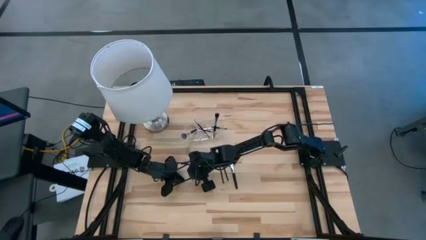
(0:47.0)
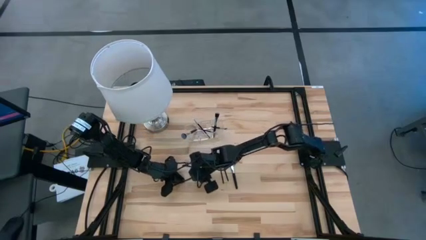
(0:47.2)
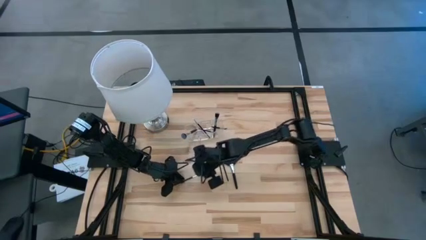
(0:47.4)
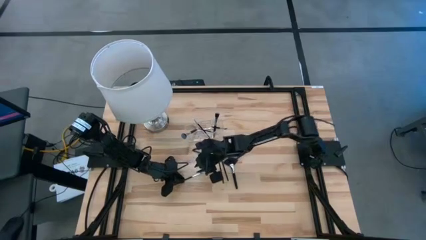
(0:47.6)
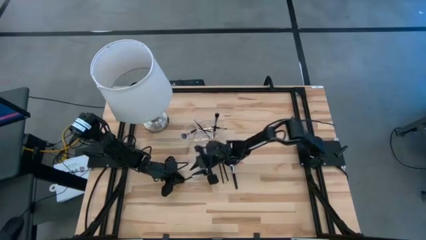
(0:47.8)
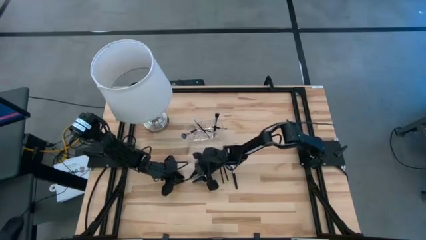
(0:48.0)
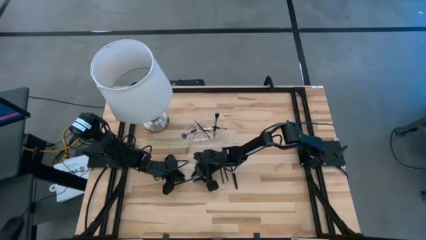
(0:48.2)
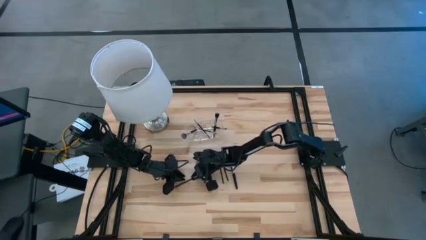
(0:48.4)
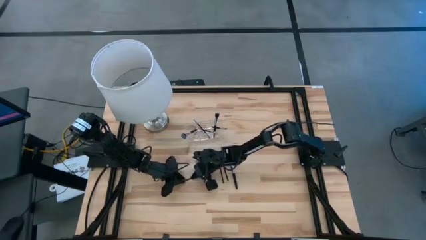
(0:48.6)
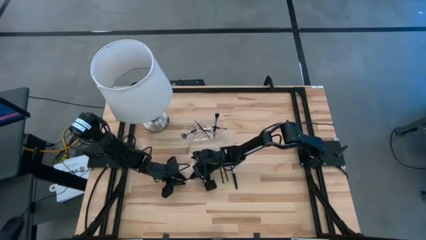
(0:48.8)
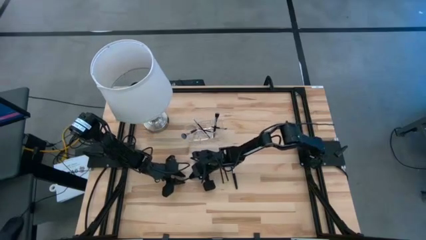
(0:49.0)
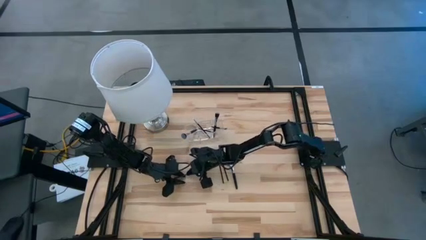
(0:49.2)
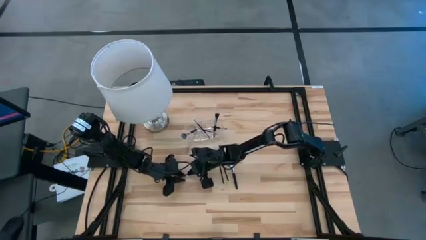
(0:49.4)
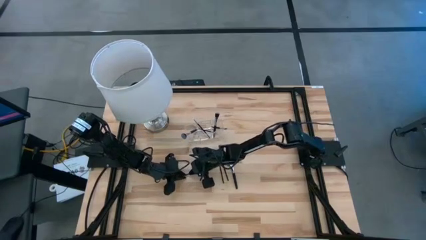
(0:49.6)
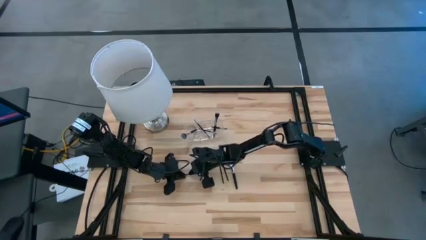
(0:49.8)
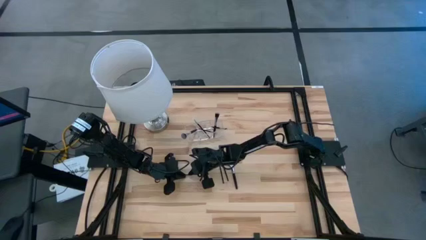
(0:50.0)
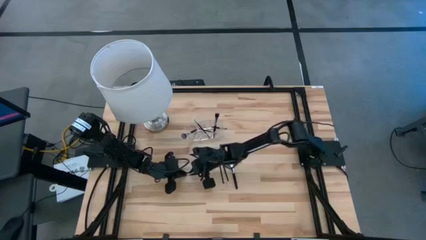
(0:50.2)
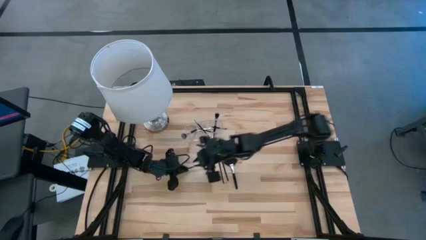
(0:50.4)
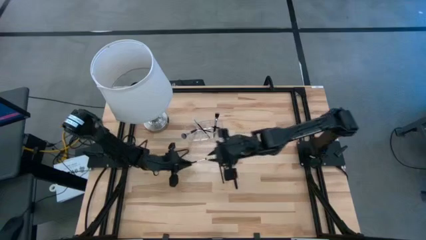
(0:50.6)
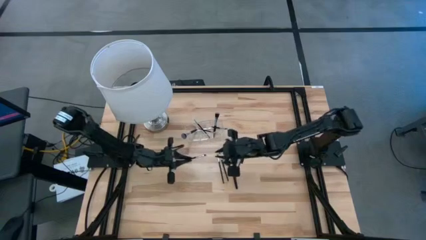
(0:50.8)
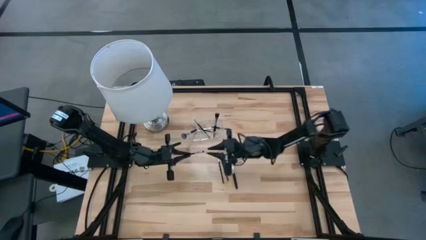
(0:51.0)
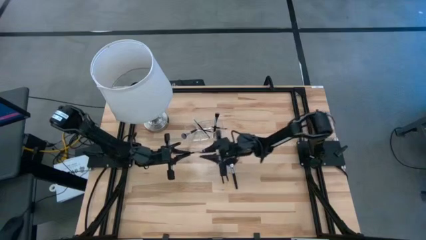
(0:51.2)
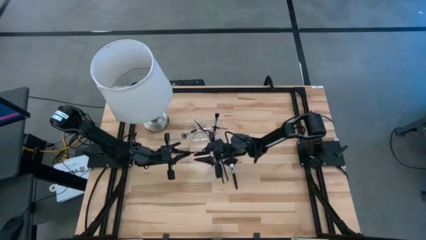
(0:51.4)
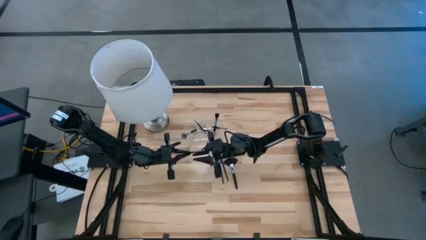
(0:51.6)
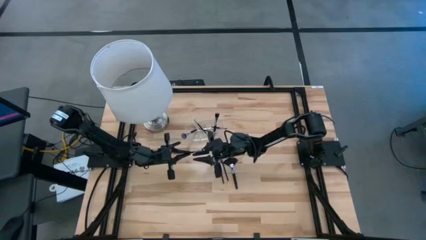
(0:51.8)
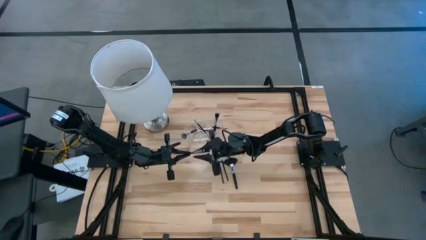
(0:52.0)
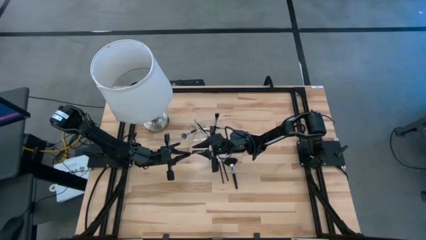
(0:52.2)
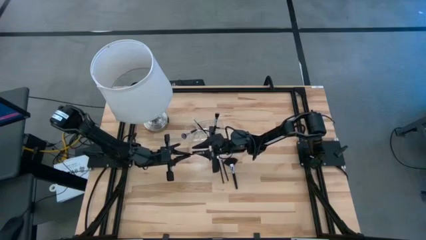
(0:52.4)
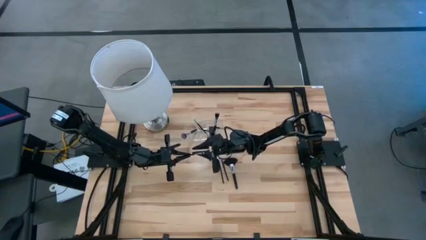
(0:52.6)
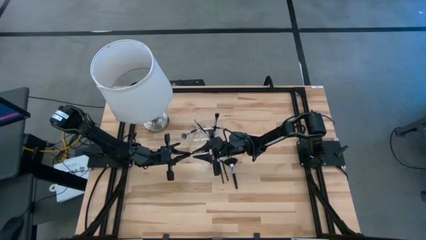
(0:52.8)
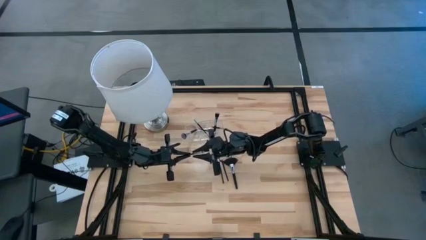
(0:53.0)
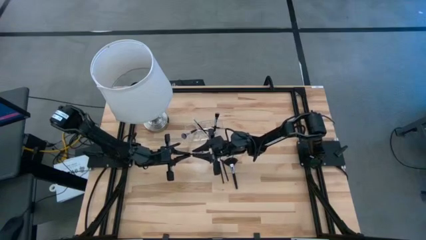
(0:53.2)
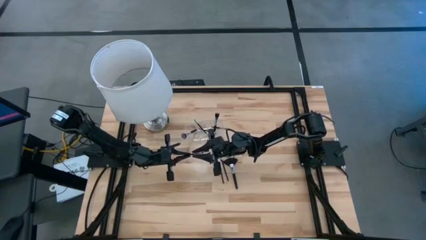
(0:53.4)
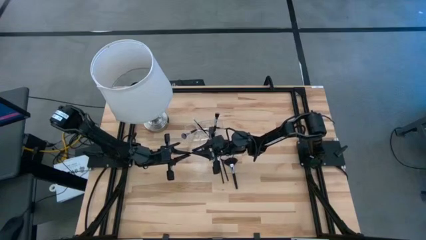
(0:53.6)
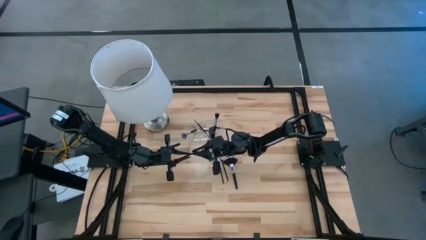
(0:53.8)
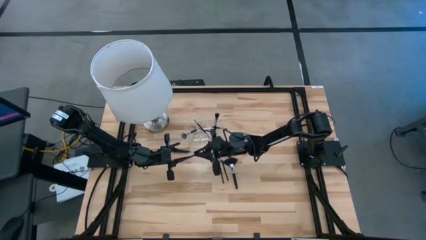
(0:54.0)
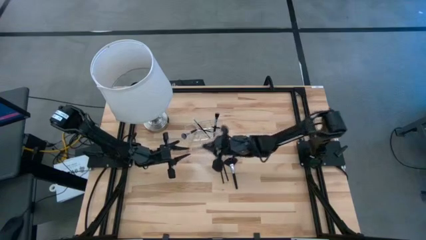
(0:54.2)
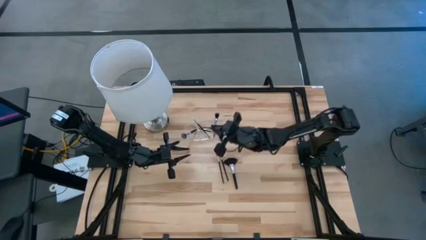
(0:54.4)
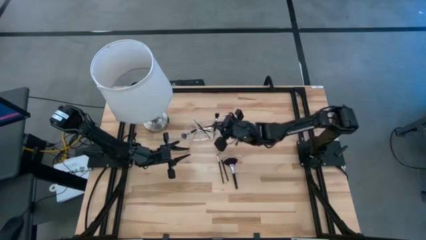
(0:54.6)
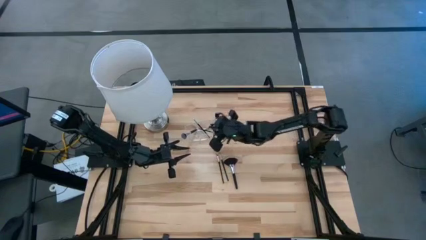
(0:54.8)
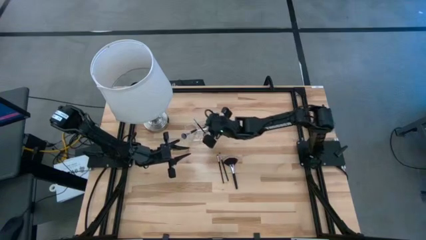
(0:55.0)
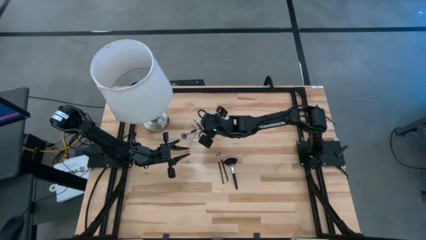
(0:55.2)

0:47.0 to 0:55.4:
Task: Put items in baskets/containers
Put the black foundation brush into the transparent organizer

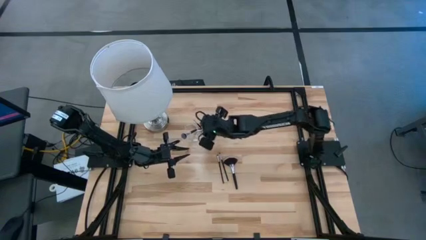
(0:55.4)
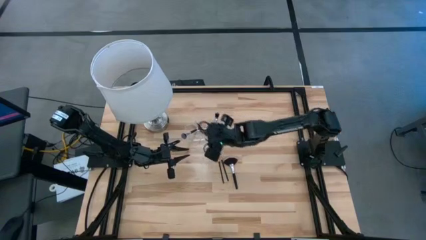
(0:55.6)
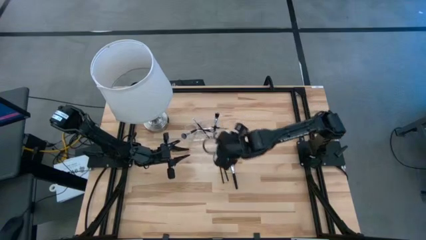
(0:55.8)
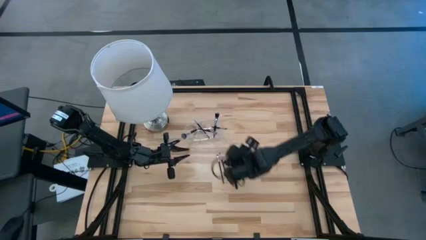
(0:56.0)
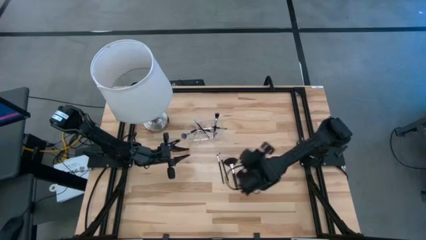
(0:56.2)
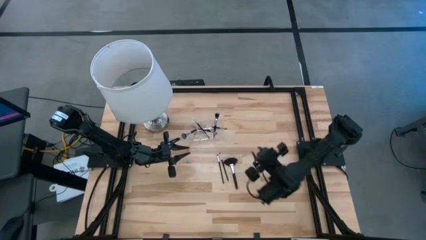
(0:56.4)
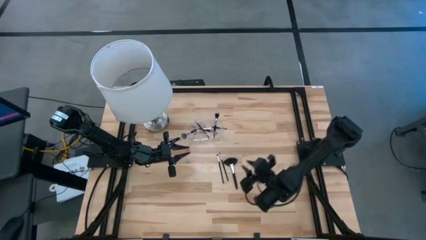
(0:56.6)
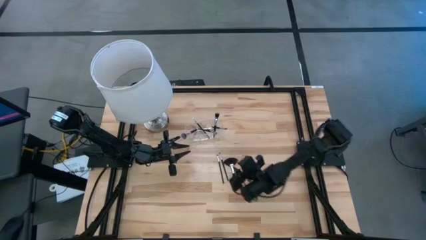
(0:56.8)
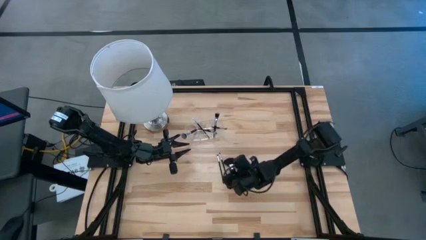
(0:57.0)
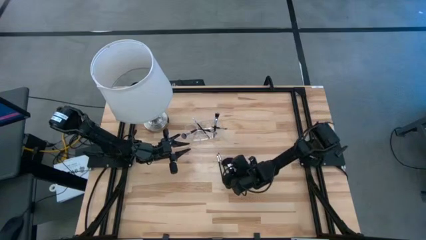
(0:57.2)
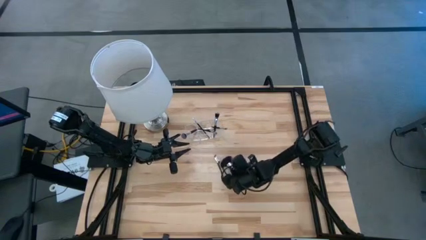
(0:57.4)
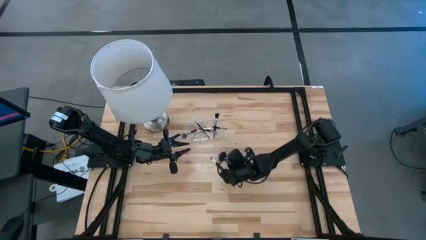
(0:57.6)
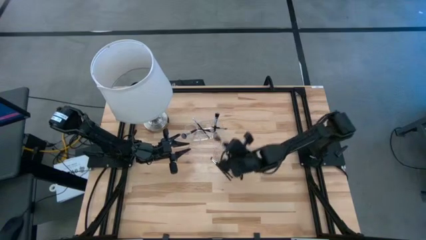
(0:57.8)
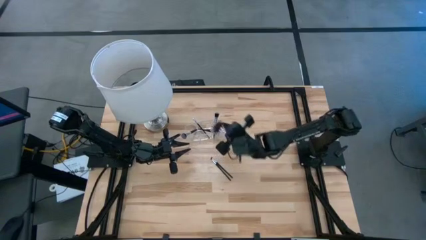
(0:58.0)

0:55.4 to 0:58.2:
Put the black highlighter brush into the transparent organizer

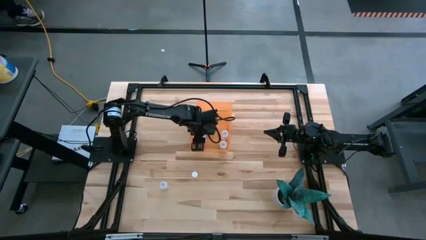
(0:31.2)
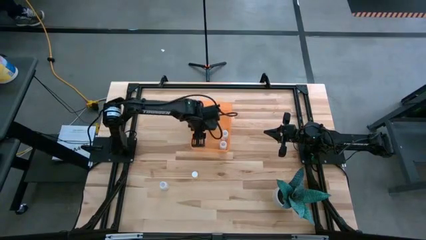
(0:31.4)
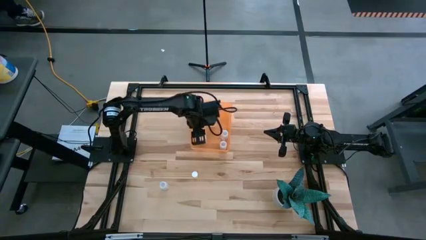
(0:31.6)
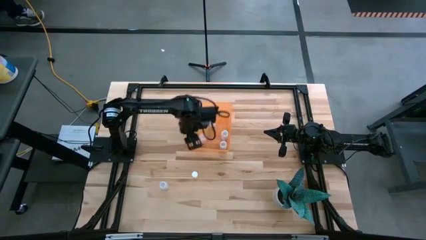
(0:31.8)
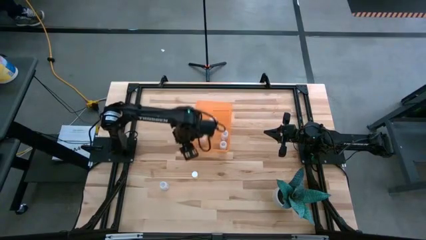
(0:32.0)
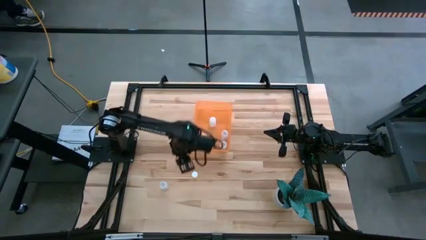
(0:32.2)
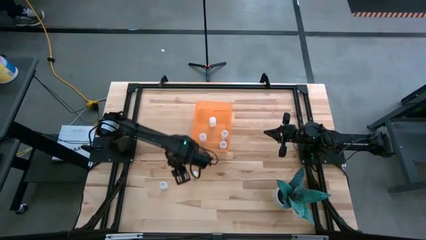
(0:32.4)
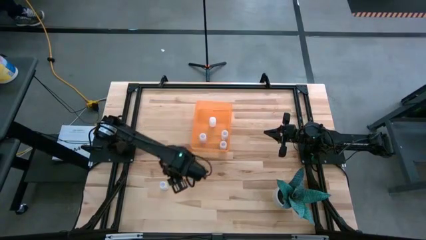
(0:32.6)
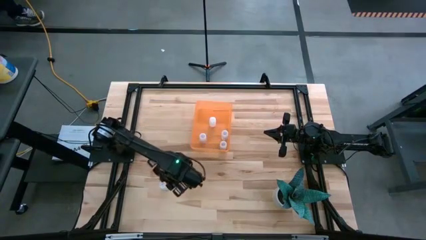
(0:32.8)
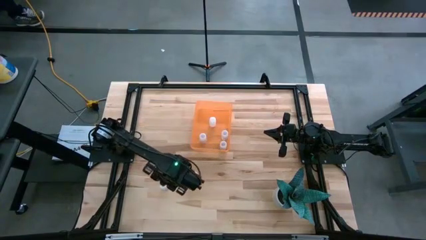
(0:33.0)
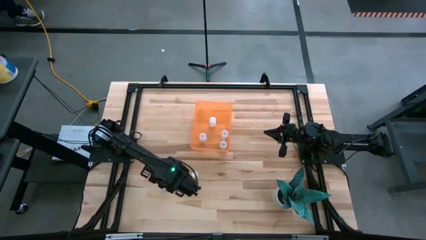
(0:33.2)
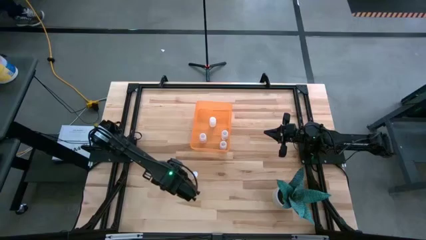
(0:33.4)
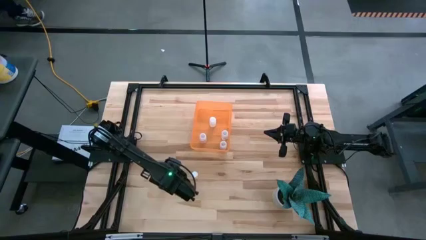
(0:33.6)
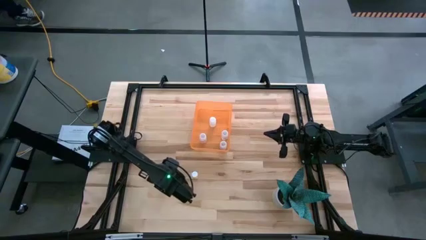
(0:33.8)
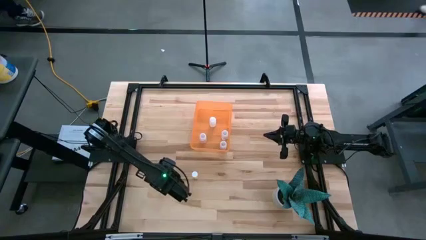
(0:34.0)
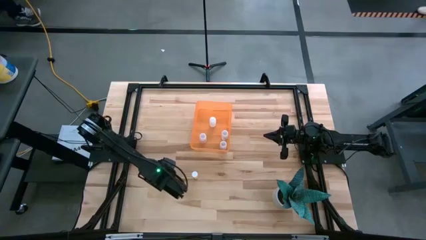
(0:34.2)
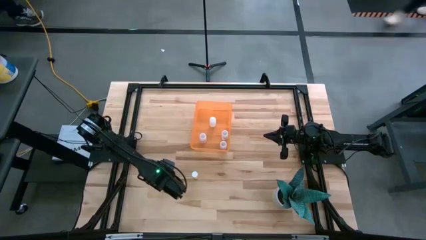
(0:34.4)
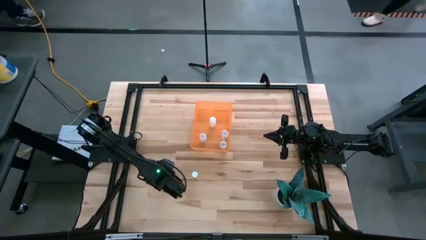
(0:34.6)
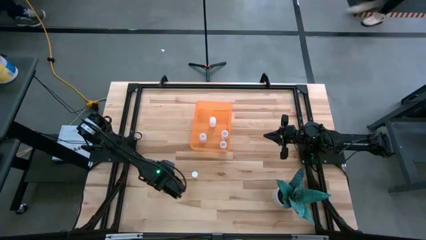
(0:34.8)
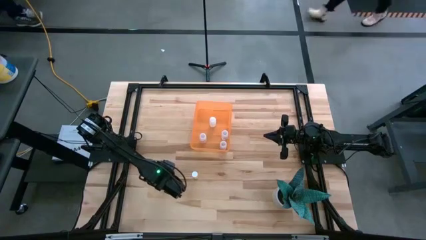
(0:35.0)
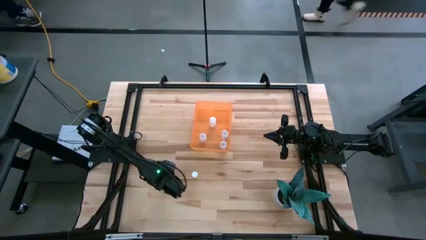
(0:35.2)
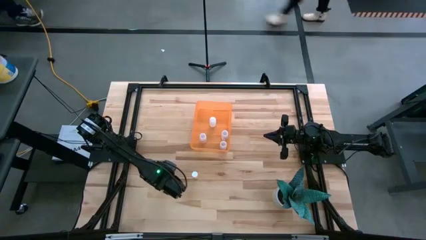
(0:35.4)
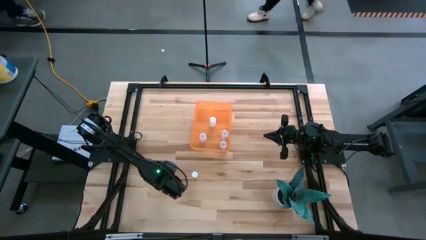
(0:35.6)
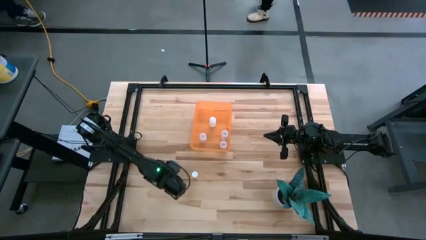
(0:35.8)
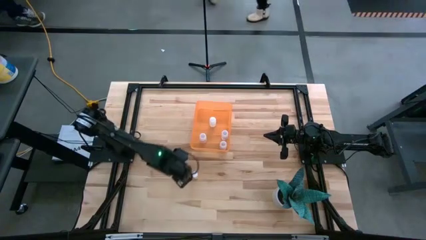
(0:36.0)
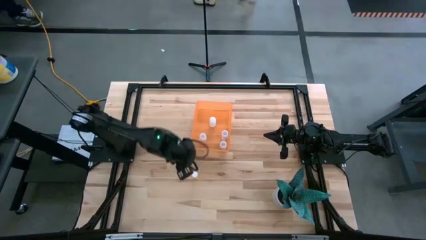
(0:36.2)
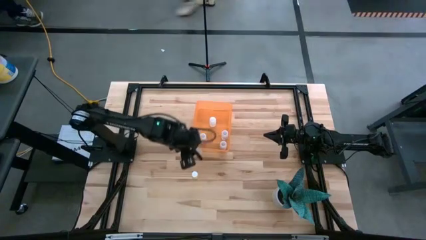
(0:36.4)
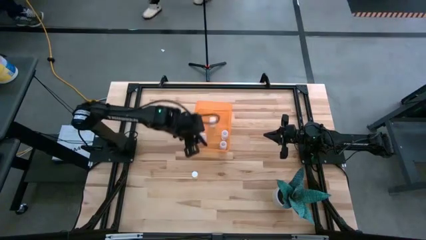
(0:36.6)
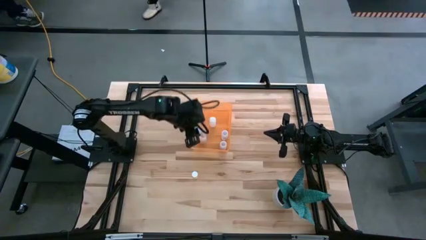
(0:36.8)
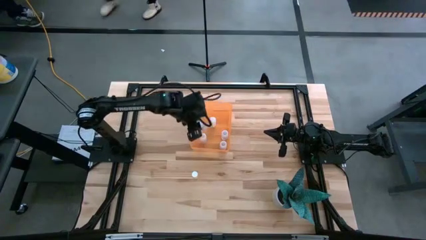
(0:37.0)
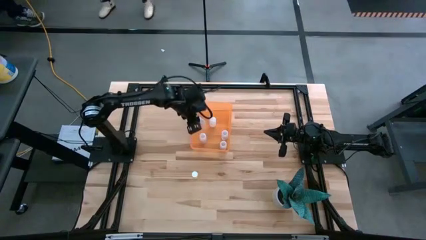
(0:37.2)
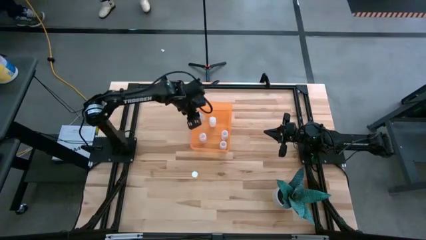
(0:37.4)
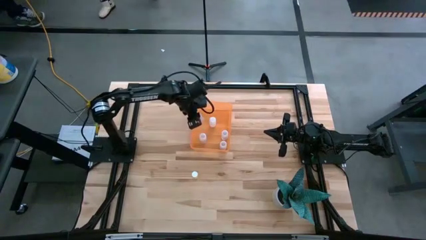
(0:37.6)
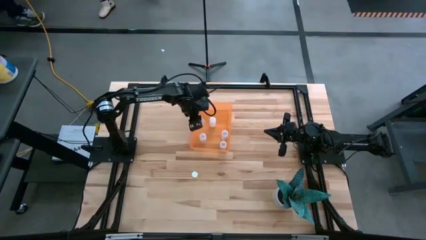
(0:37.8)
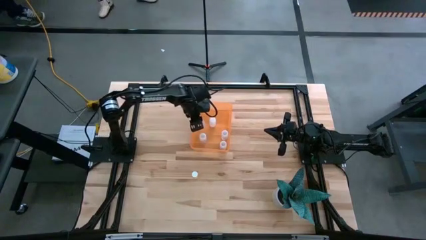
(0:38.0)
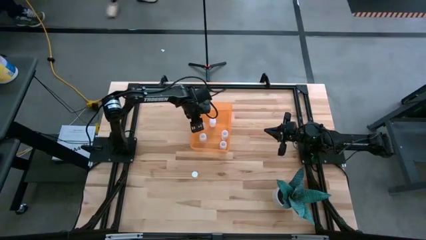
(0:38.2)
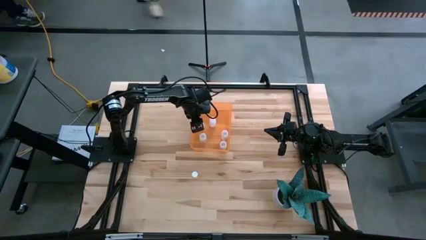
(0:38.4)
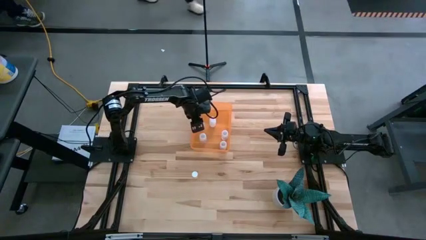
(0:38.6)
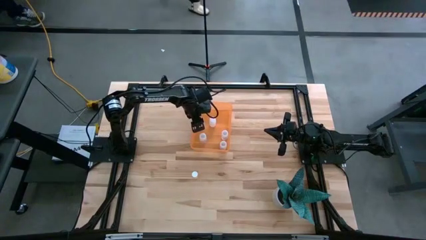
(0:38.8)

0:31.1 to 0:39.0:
Task: Pick and place pill bottles into a basket
Put the transparent medicine bottle into the yellow bin
